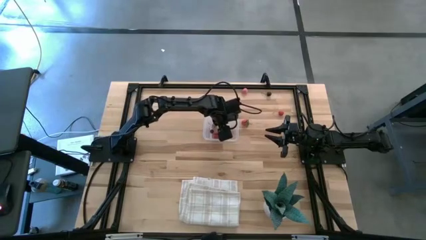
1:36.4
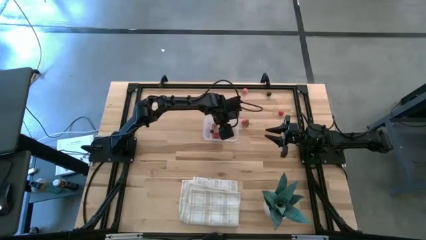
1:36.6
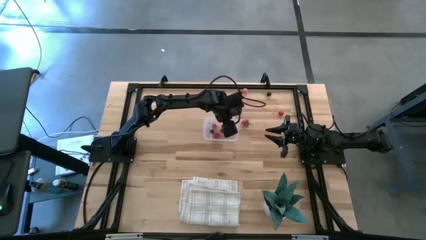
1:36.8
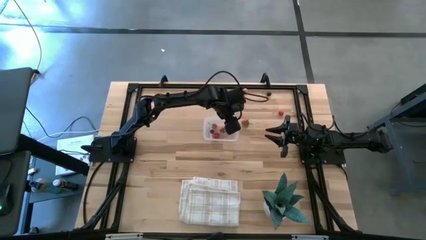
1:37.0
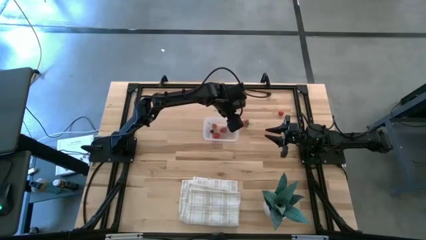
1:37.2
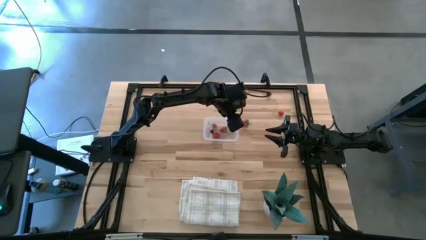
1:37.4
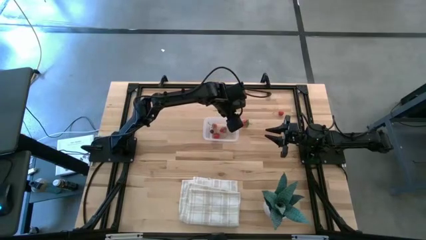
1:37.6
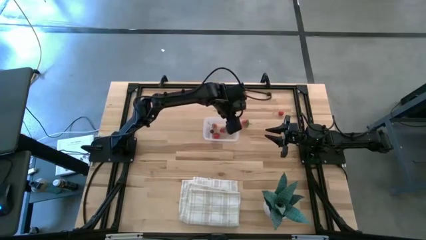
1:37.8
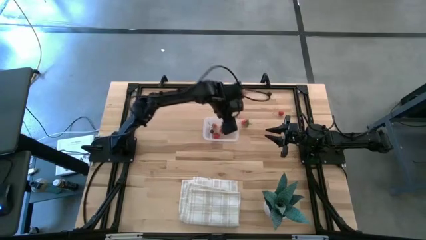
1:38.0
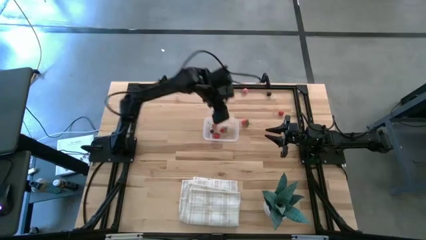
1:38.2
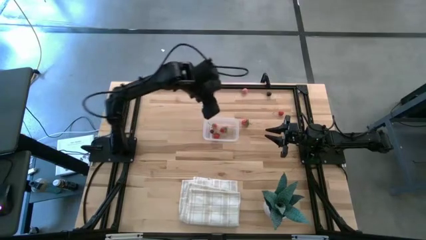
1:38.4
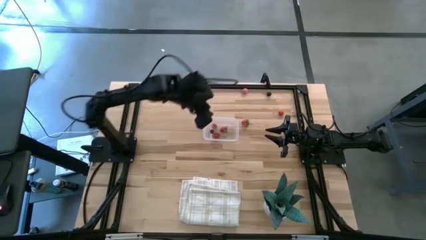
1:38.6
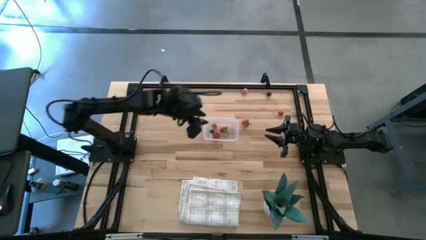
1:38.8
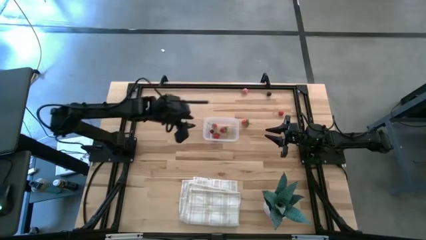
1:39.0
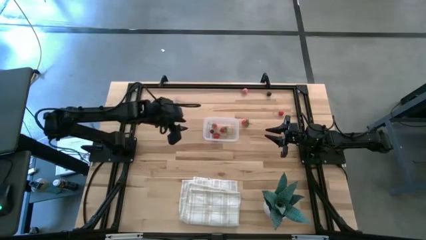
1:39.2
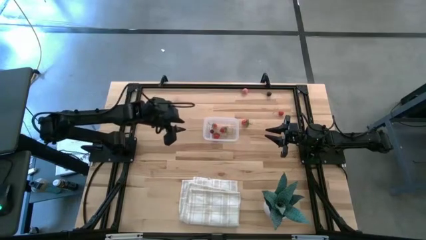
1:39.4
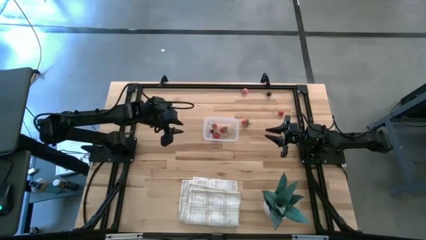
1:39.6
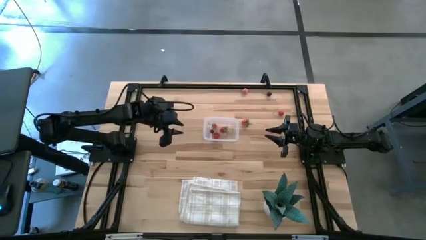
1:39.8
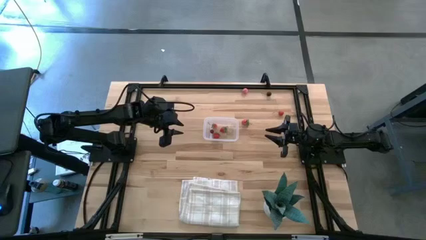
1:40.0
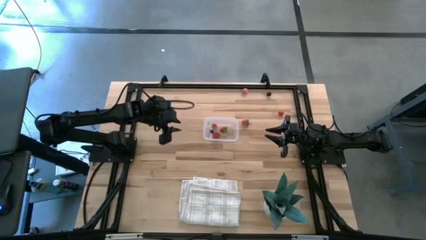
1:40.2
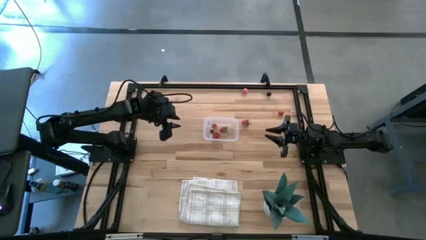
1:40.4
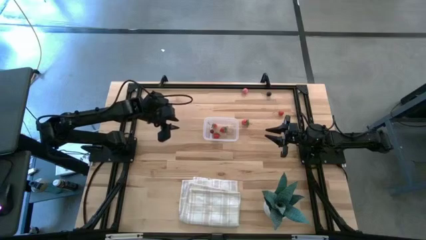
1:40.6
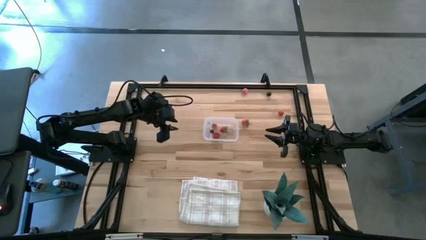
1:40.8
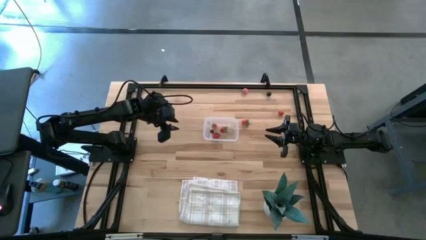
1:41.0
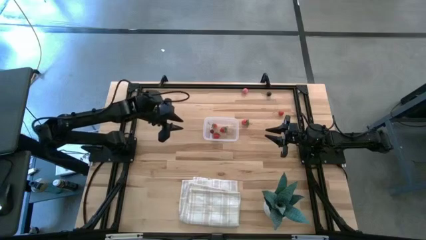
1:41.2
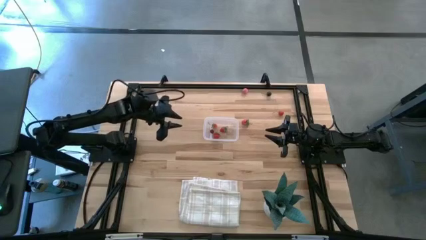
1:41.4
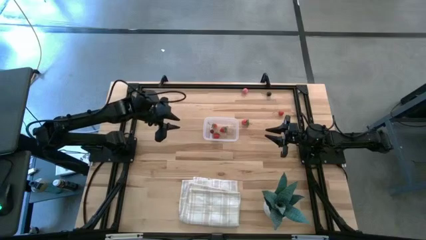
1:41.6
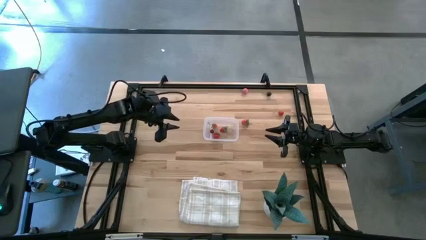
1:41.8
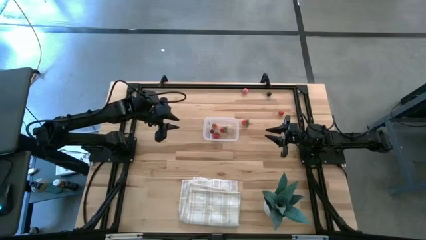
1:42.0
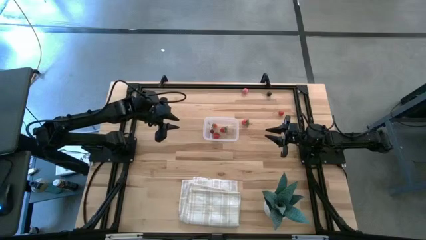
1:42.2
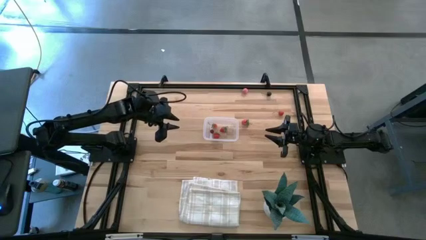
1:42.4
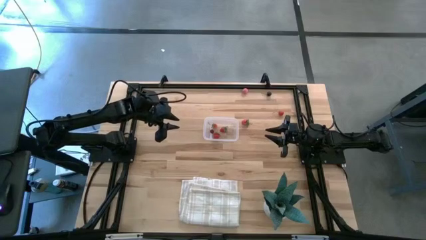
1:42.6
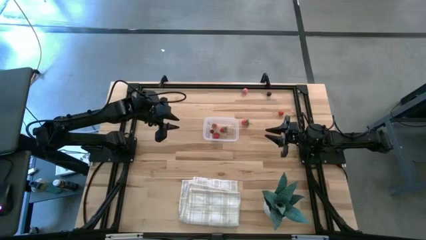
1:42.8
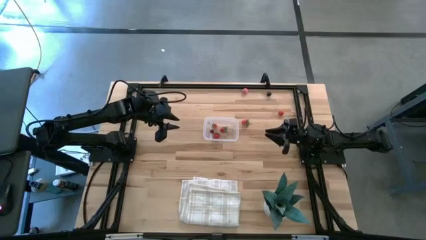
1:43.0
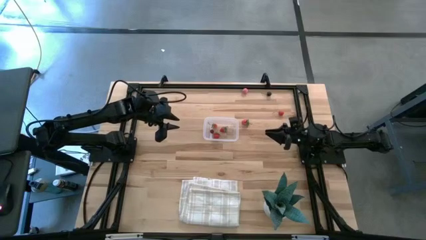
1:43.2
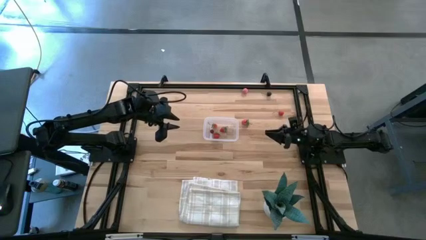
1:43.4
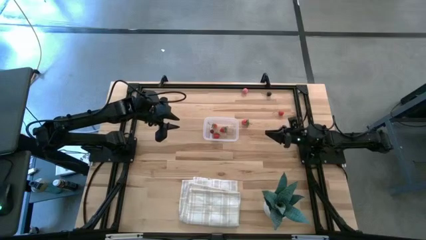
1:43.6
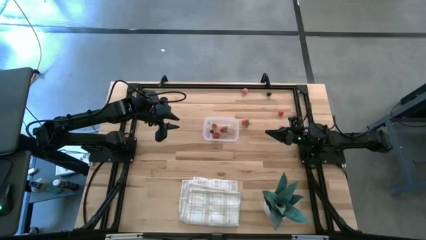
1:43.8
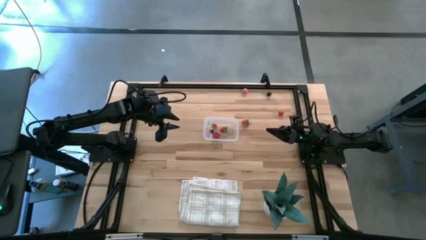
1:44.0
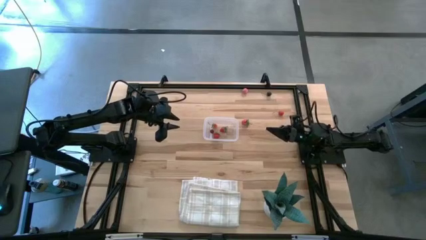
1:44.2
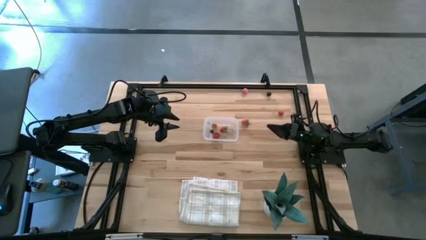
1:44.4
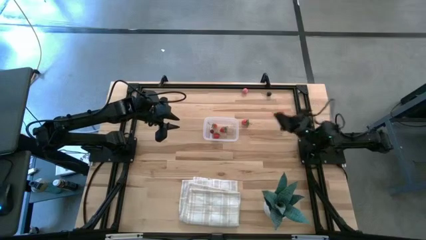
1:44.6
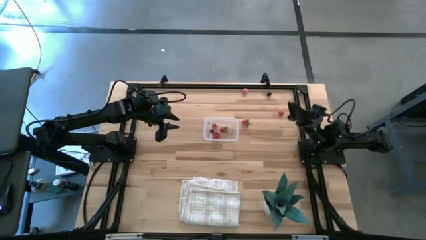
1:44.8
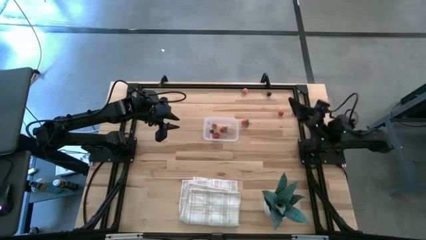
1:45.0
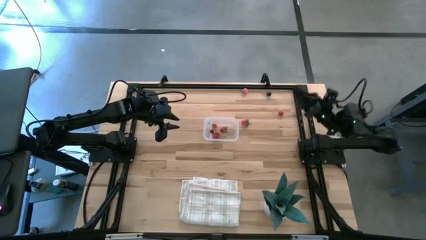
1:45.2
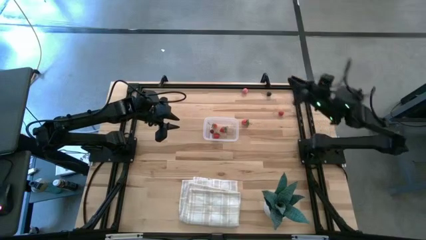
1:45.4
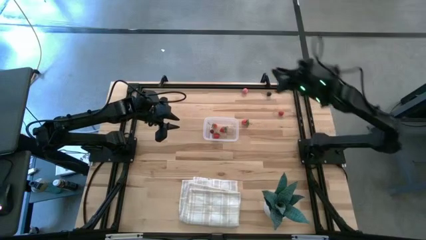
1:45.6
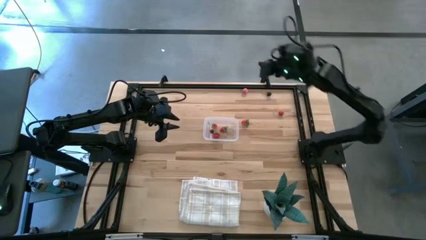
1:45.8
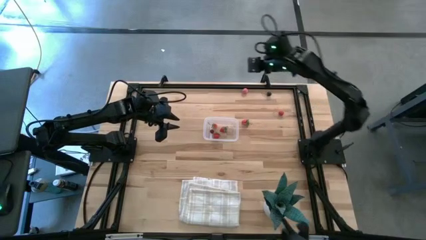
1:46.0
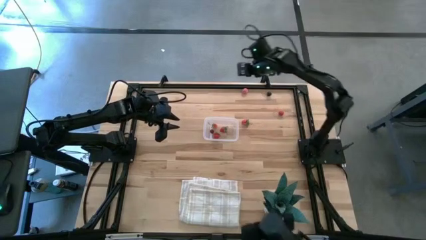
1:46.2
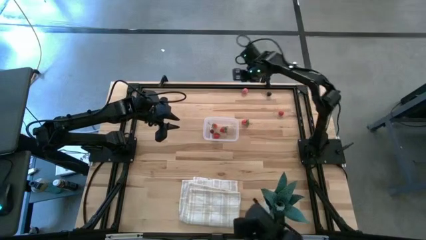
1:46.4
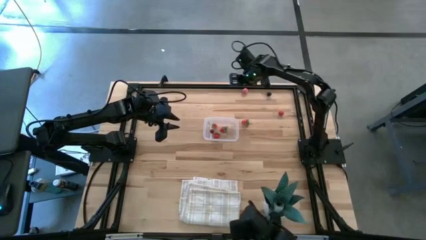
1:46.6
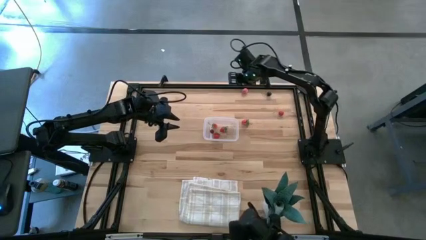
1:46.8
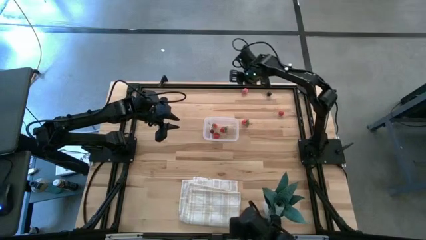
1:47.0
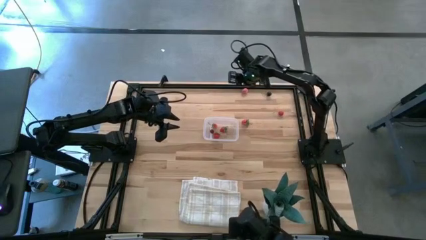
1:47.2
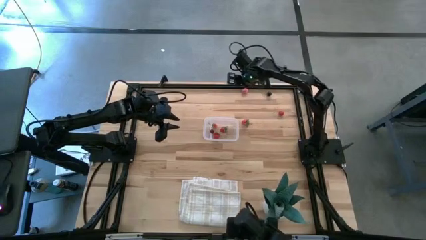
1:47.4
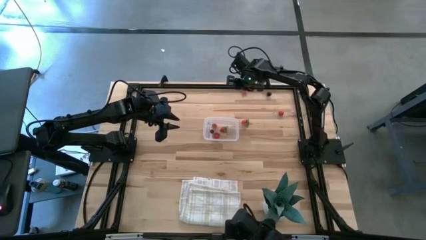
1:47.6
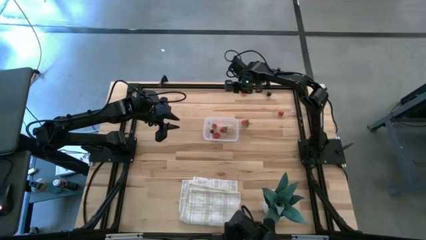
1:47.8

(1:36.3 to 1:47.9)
Task: Pick and placing Produce into tupperware
Put the apricot into the transparent bin
